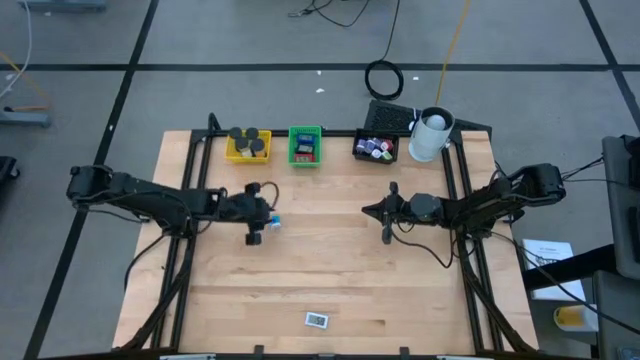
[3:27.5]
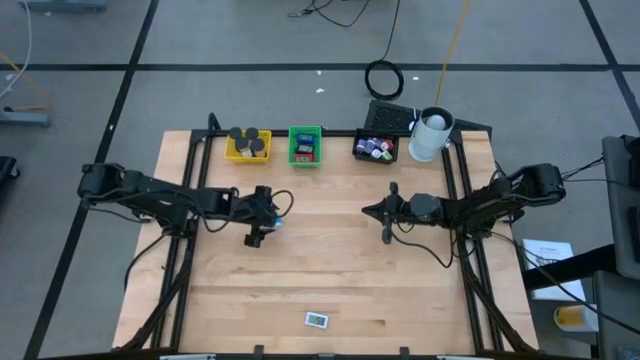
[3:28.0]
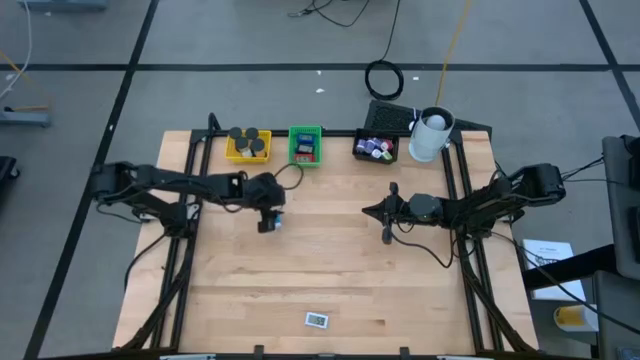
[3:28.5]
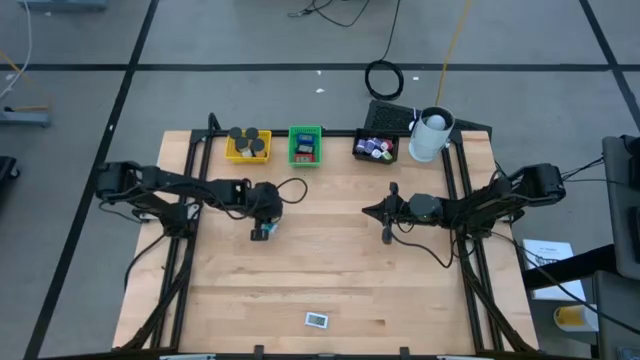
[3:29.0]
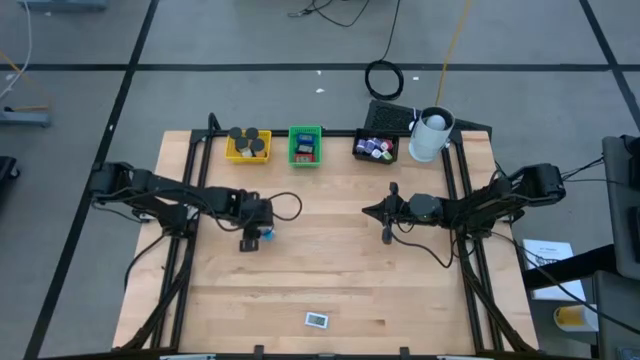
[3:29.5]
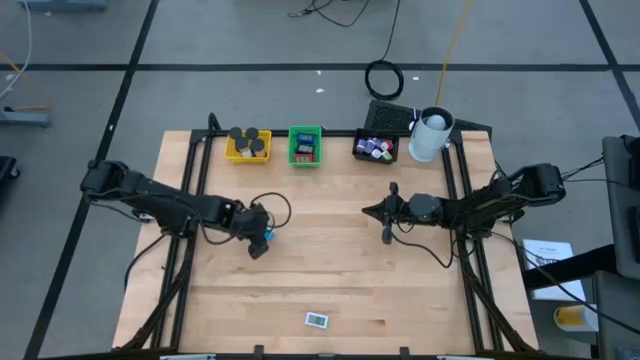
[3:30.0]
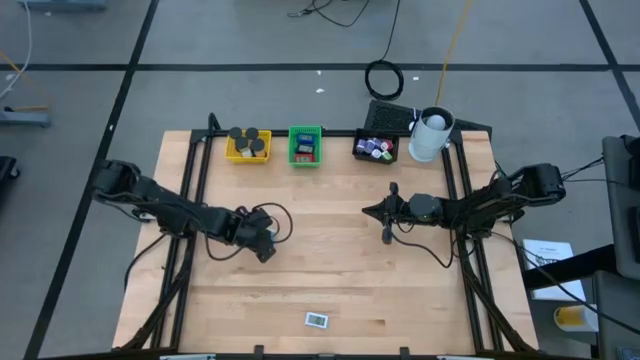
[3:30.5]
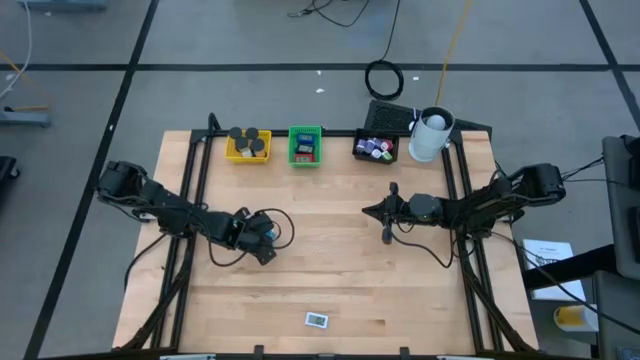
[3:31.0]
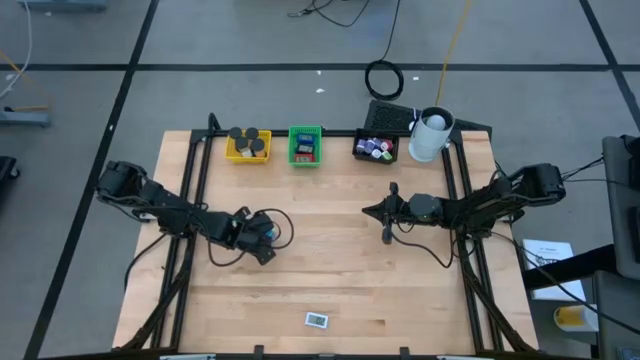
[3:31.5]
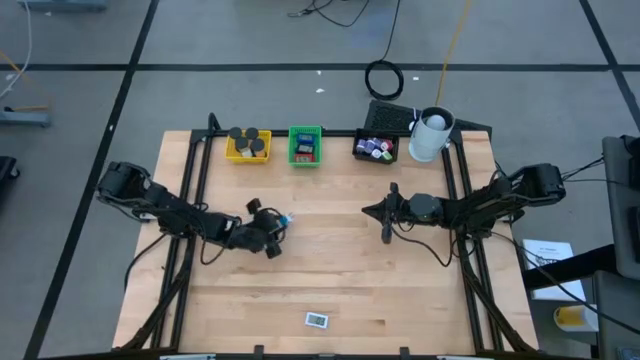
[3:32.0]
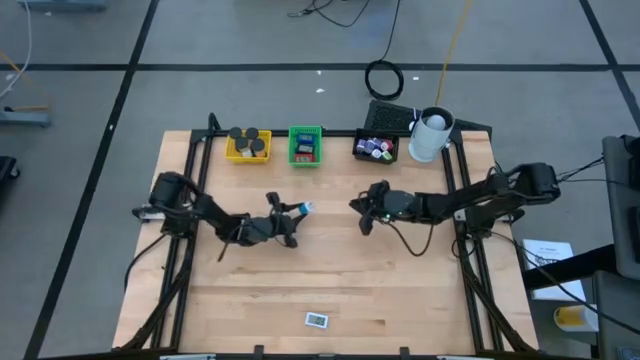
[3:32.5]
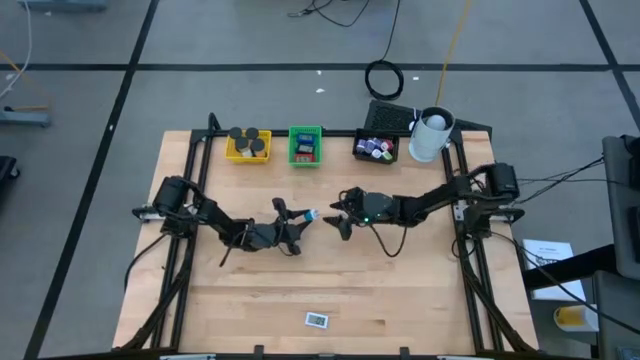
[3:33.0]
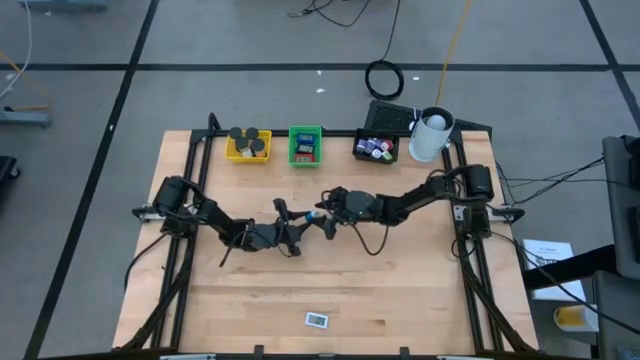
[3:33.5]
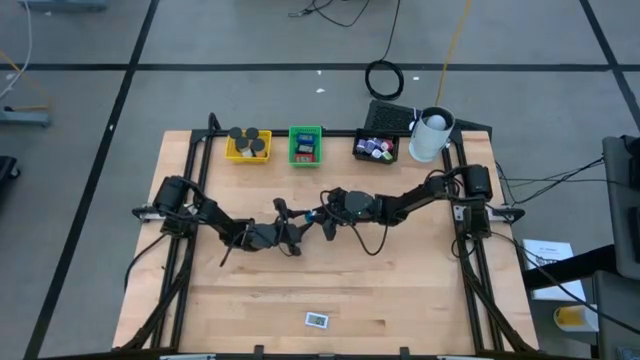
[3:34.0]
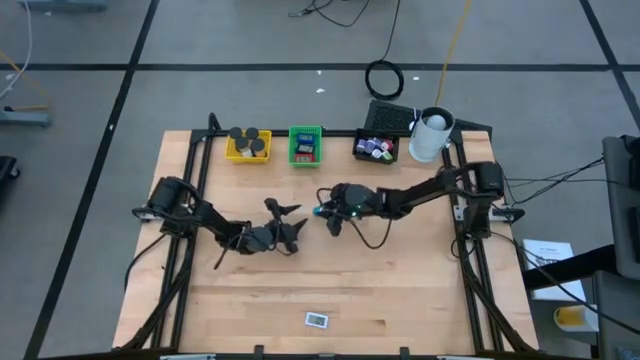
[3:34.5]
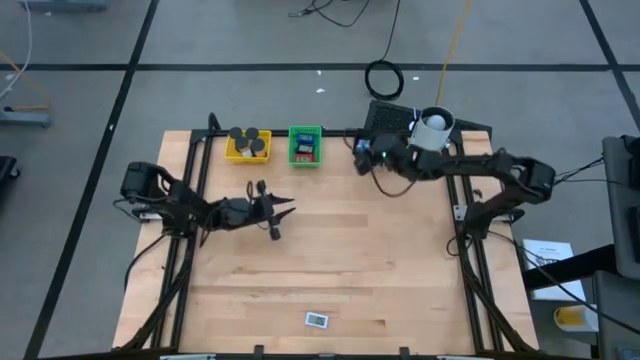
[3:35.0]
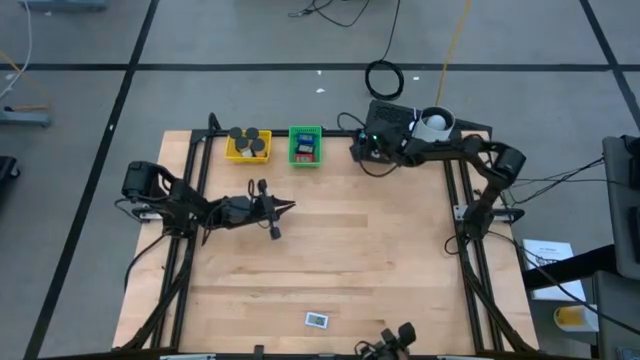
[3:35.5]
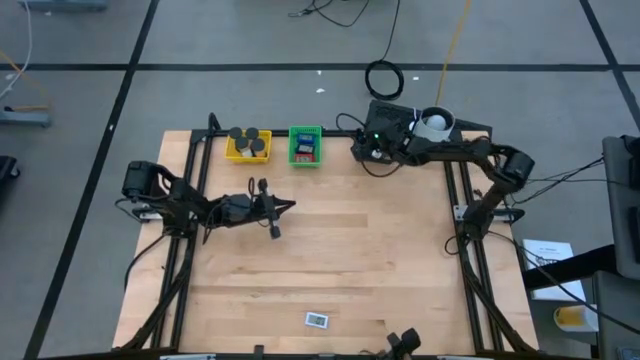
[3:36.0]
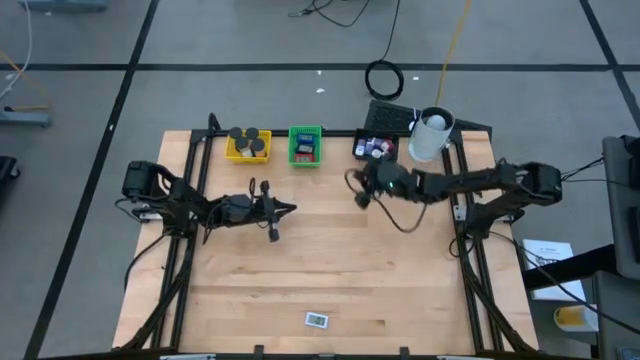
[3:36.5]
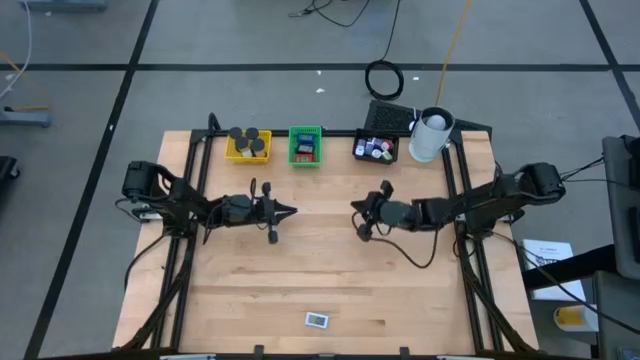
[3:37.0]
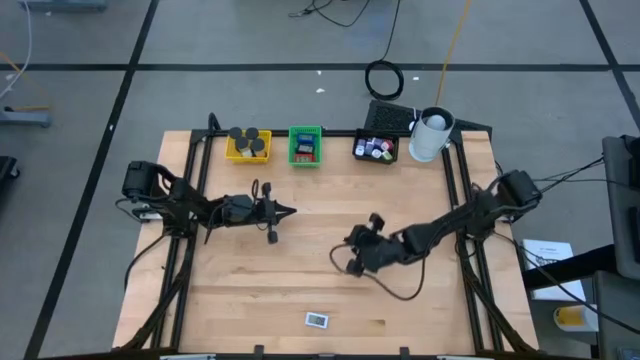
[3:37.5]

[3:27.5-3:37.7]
Task: Pick & Place Office items
Put the light blue charger adapter in the black bin

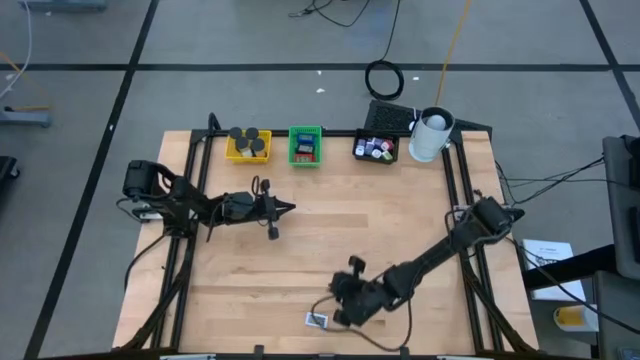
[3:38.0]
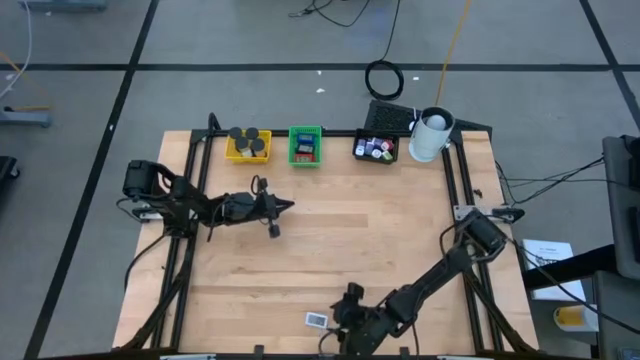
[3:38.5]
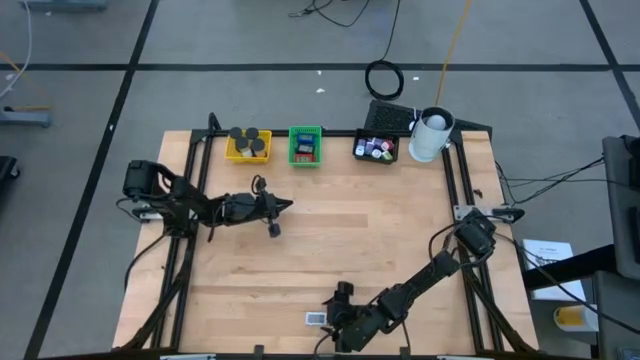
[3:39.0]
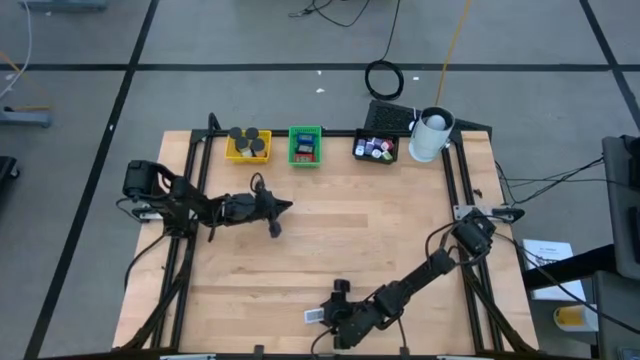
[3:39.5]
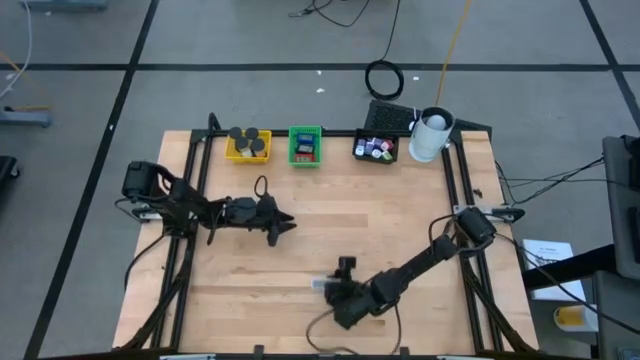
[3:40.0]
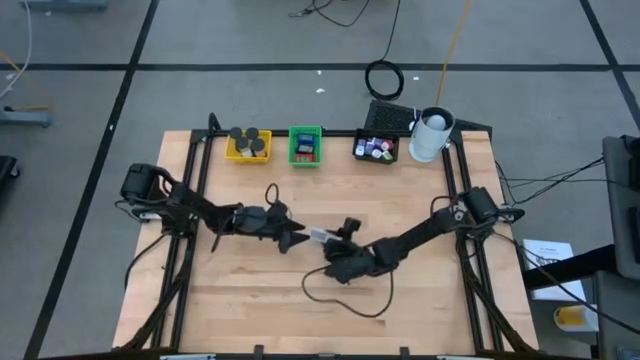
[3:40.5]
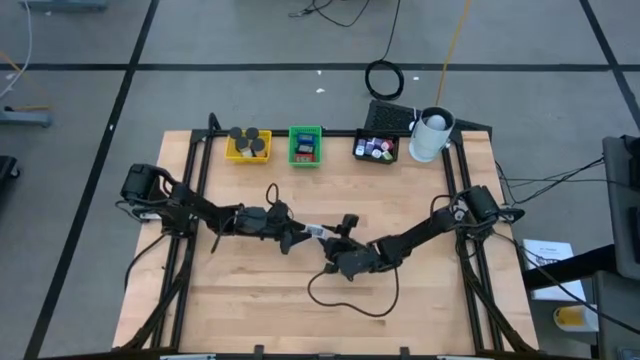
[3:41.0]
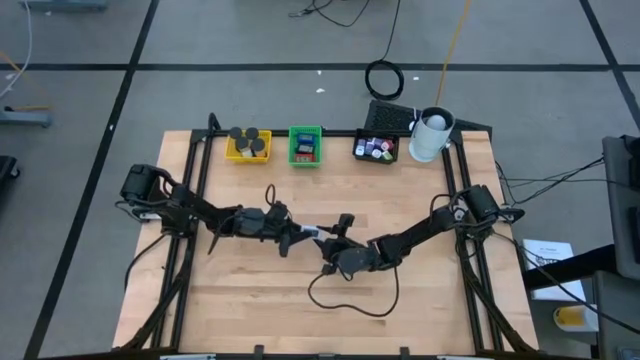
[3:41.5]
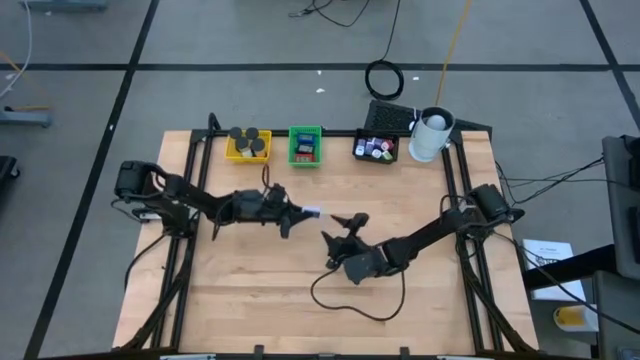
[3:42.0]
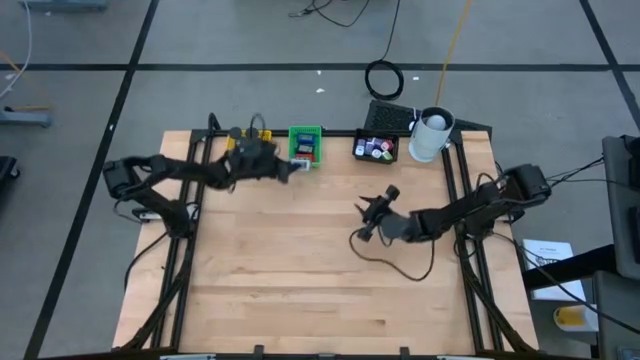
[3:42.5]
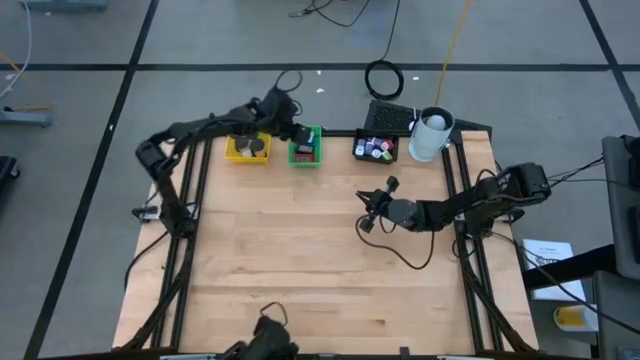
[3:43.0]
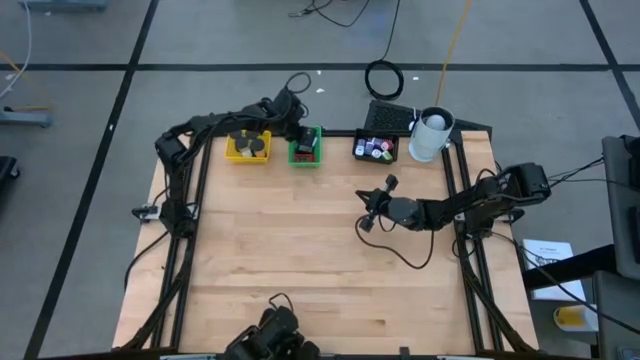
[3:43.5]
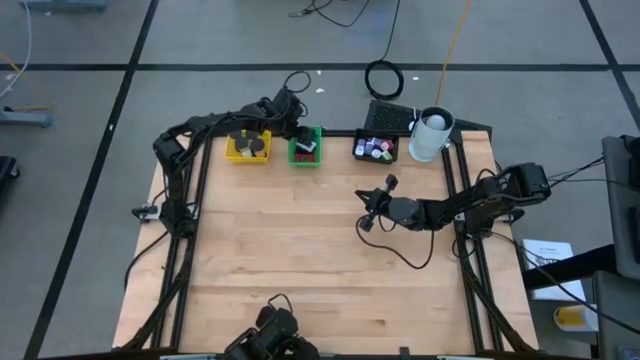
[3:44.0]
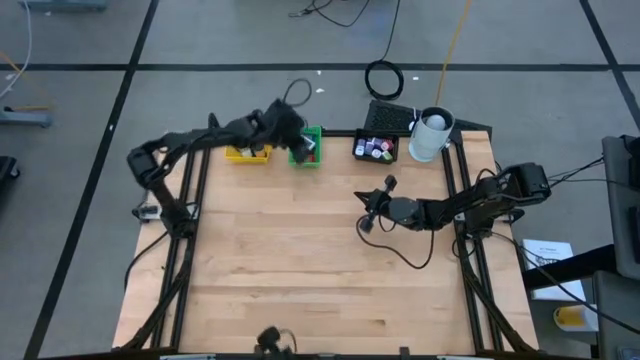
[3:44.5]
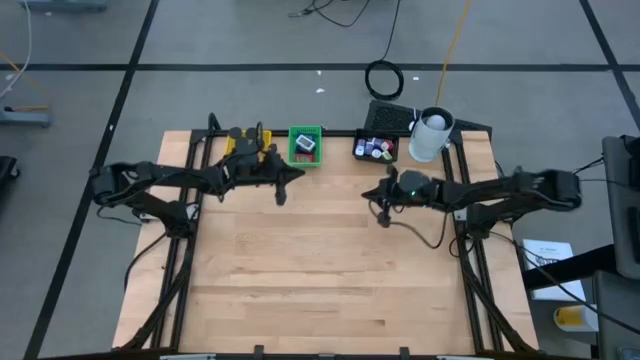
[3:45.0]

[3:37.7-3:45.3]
Put the white digital timer in the green bin

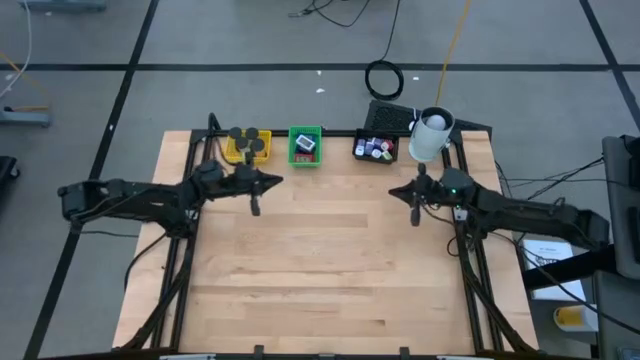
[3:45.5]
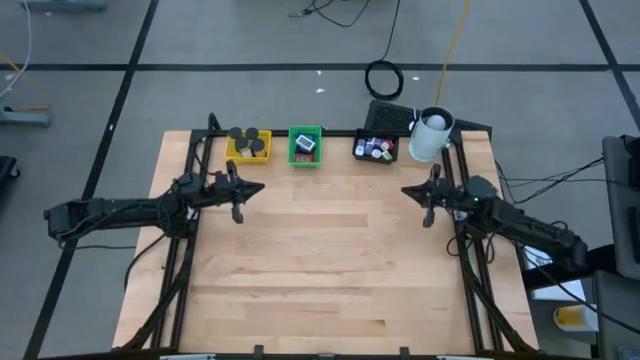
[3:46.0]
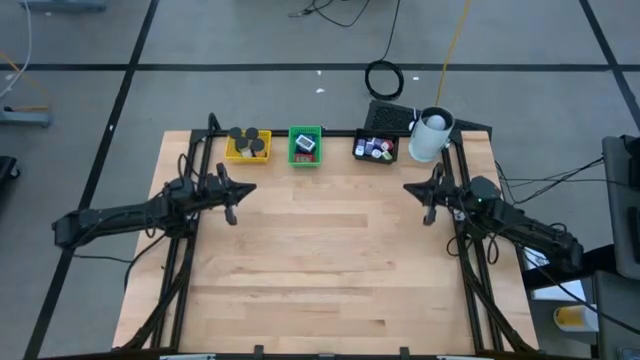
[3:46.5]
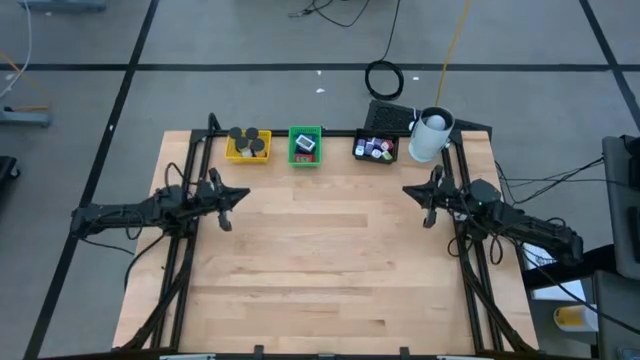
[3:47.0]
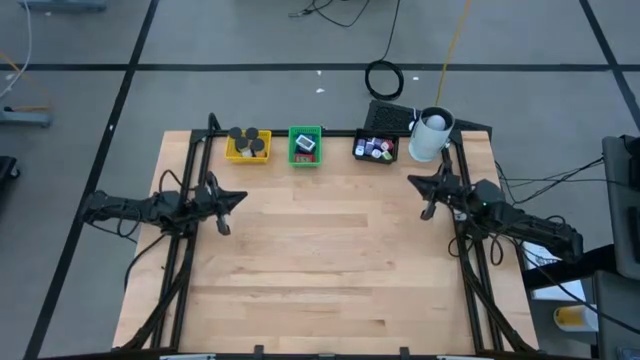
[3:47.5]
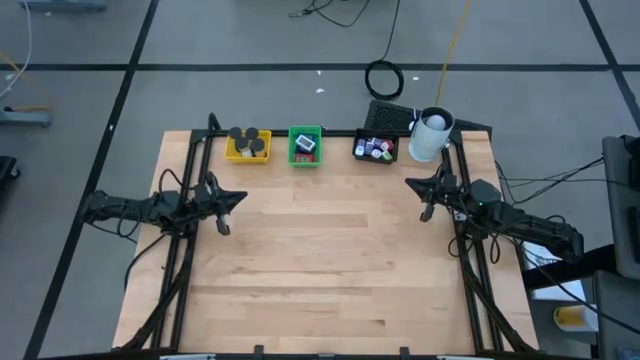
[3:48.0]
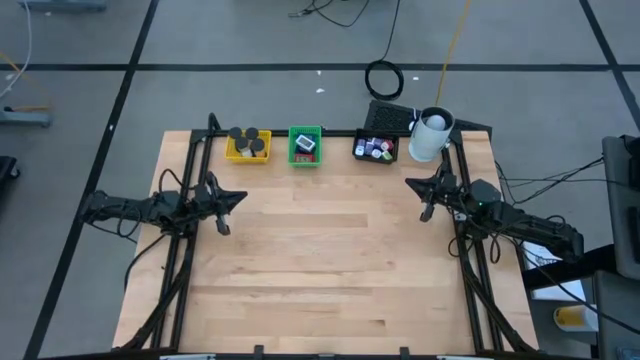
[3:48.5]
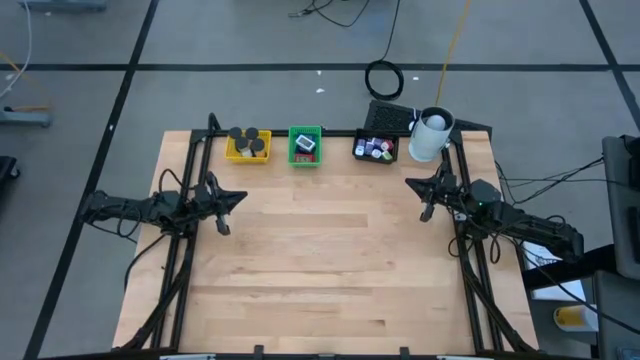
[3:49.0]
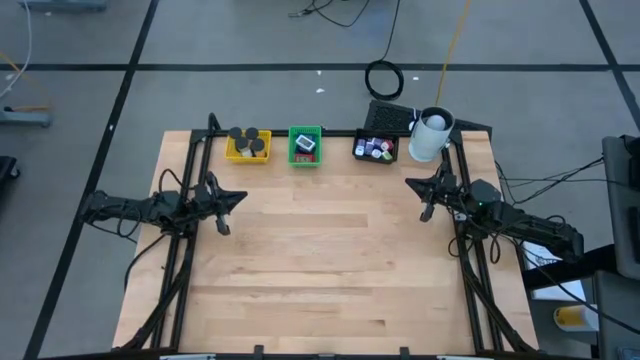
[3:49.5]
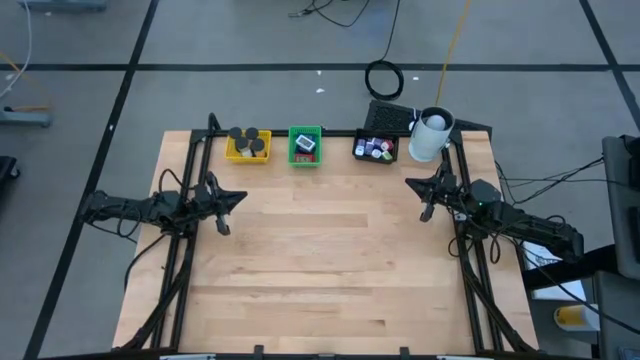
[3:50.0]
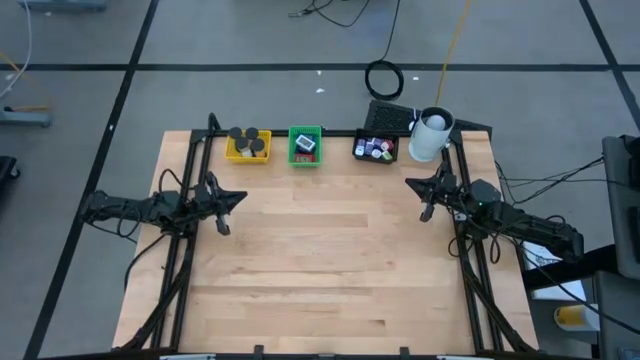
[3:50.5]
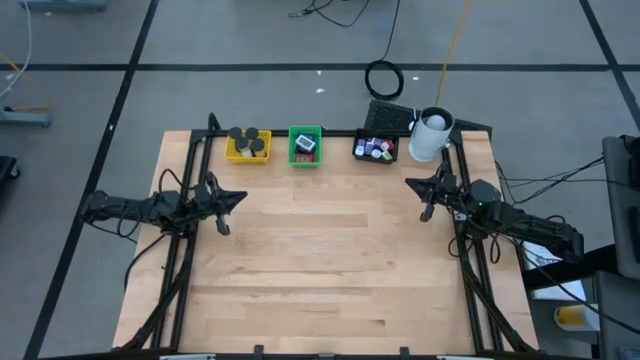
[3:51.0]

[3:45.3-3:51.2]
Return to home position
